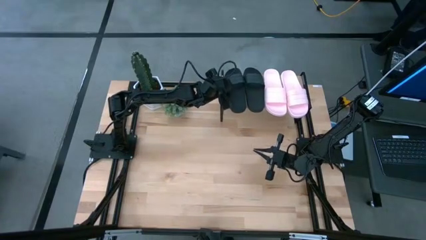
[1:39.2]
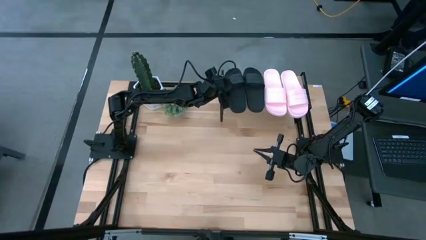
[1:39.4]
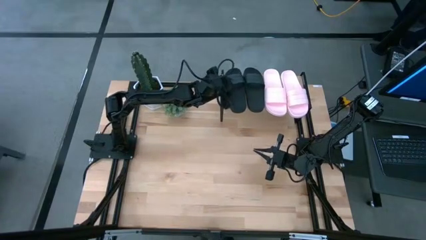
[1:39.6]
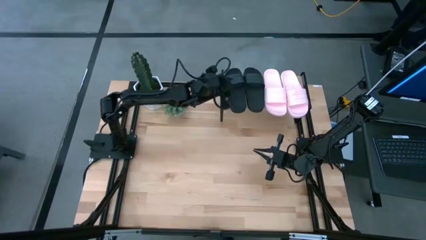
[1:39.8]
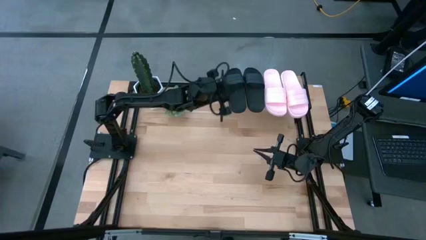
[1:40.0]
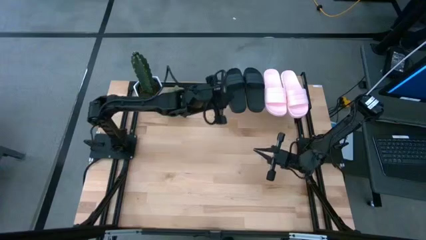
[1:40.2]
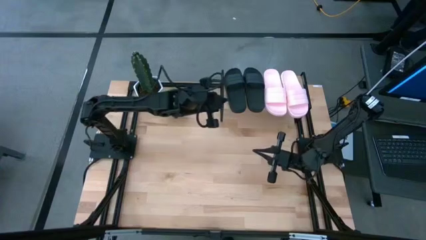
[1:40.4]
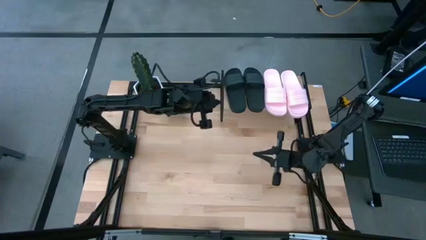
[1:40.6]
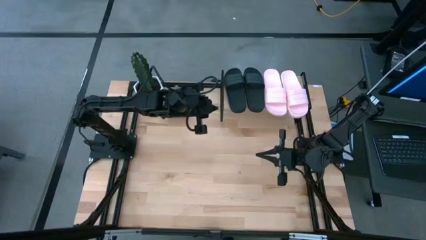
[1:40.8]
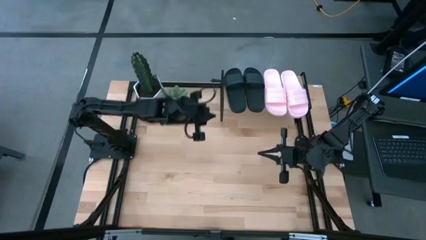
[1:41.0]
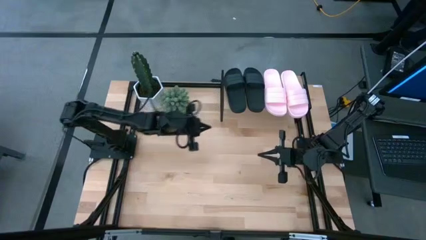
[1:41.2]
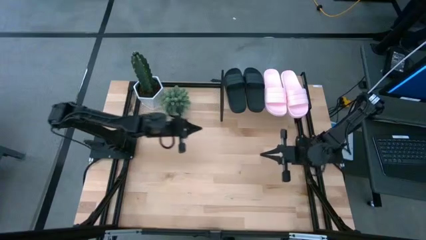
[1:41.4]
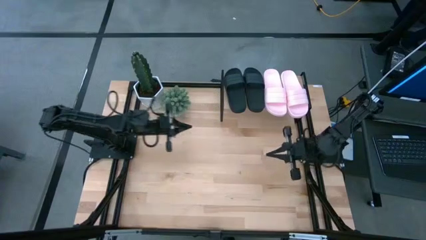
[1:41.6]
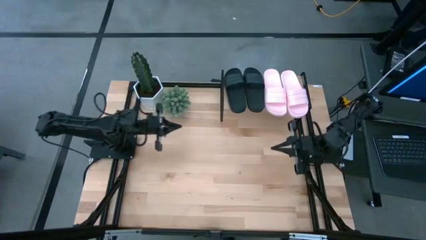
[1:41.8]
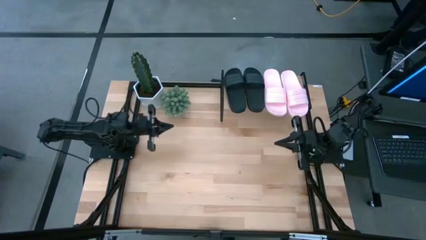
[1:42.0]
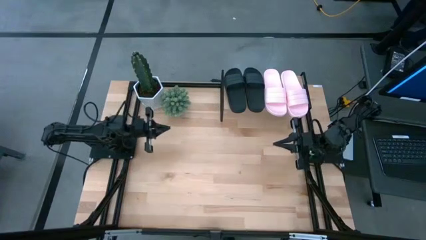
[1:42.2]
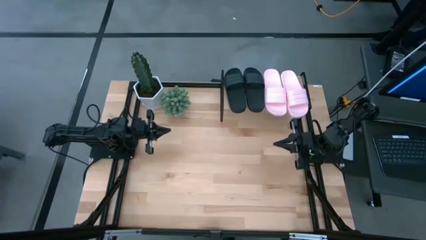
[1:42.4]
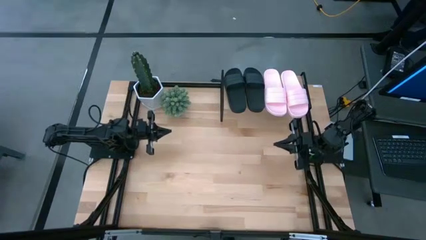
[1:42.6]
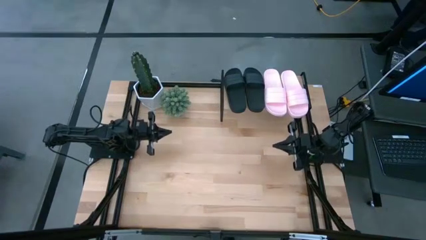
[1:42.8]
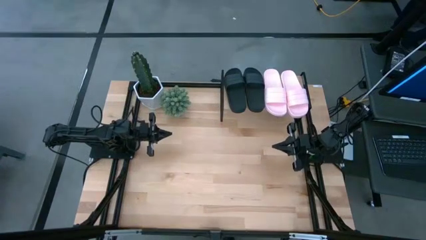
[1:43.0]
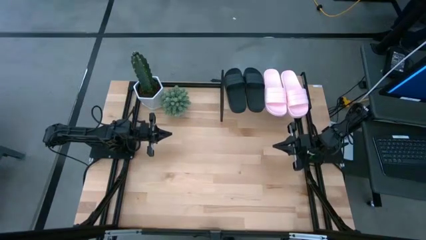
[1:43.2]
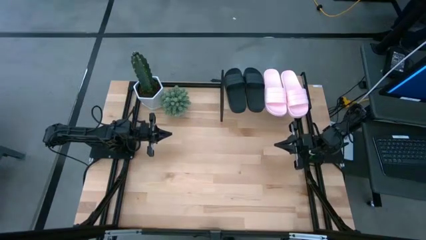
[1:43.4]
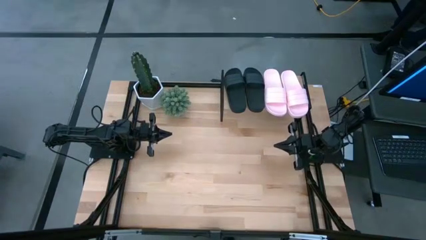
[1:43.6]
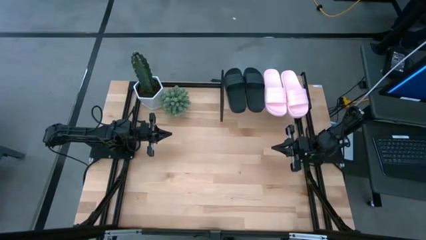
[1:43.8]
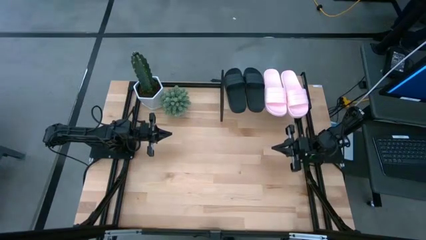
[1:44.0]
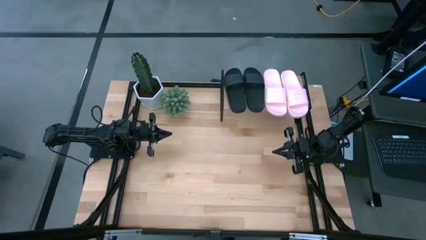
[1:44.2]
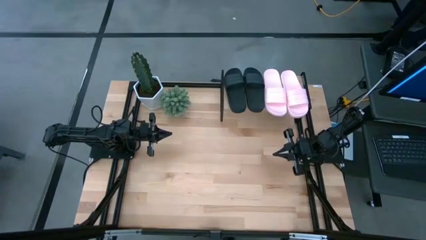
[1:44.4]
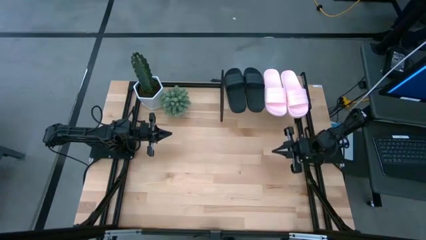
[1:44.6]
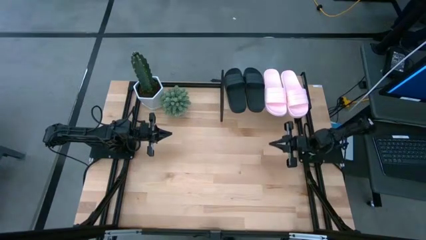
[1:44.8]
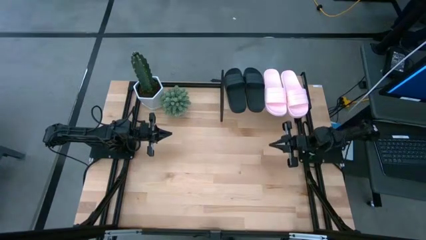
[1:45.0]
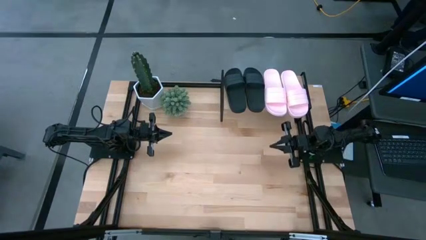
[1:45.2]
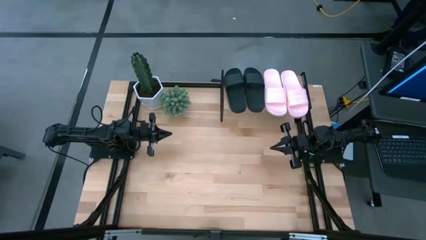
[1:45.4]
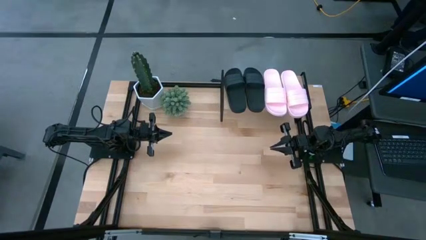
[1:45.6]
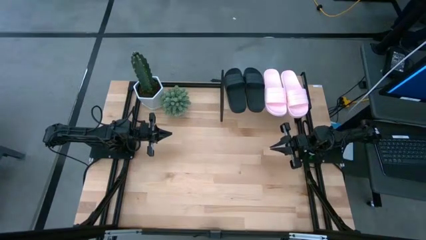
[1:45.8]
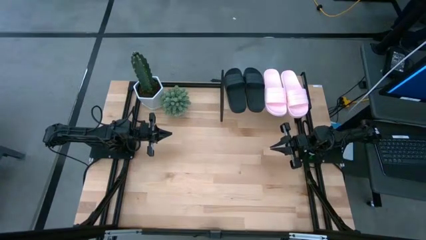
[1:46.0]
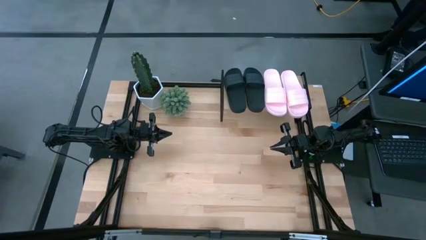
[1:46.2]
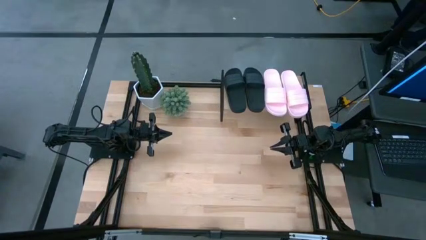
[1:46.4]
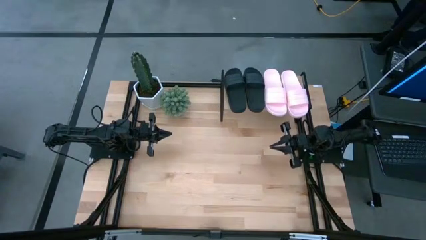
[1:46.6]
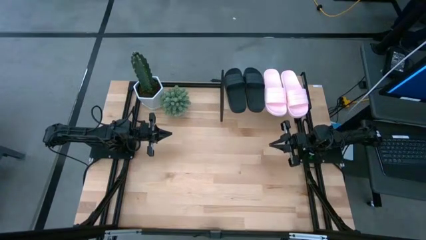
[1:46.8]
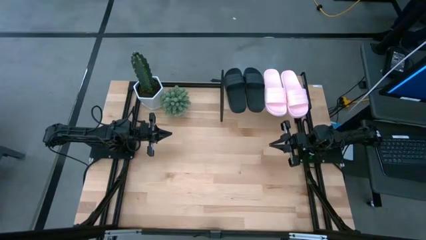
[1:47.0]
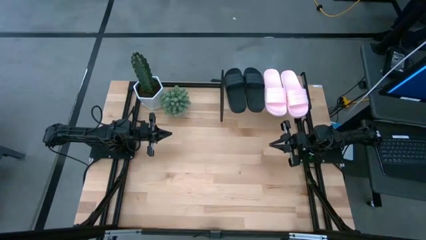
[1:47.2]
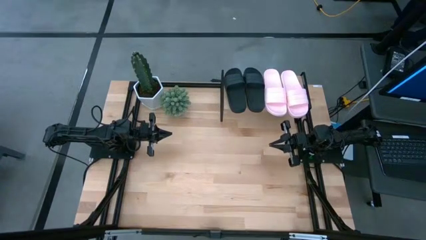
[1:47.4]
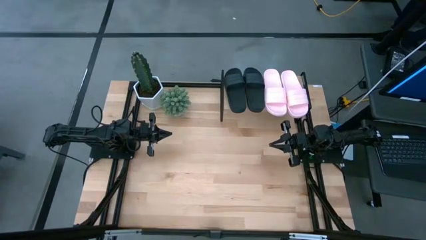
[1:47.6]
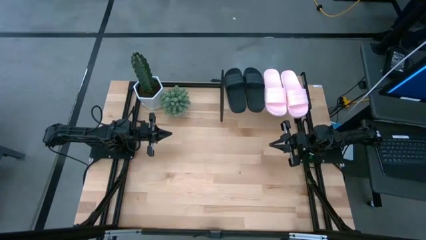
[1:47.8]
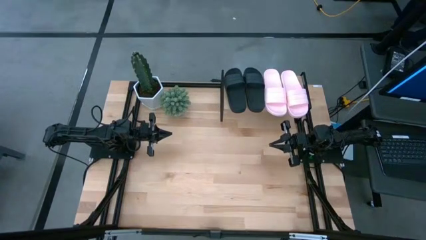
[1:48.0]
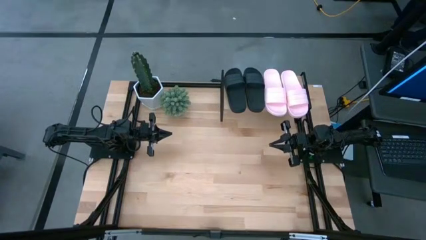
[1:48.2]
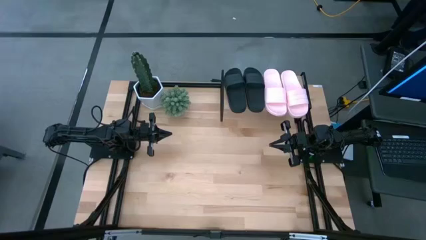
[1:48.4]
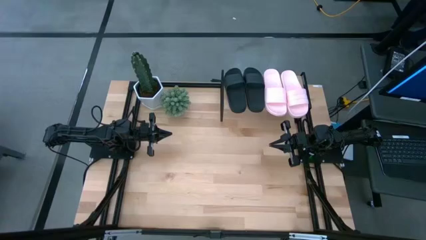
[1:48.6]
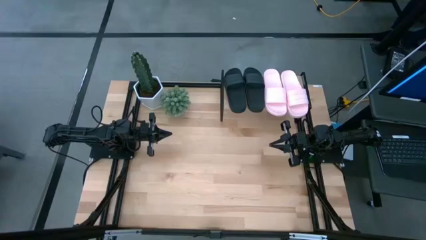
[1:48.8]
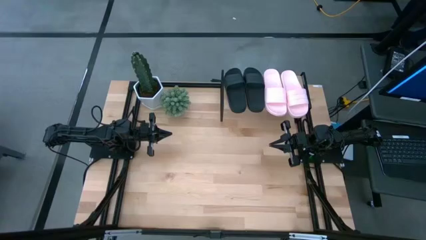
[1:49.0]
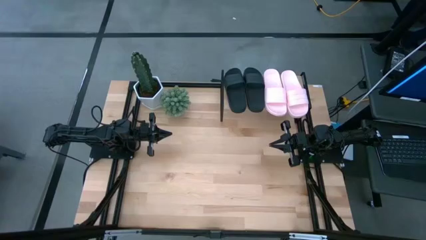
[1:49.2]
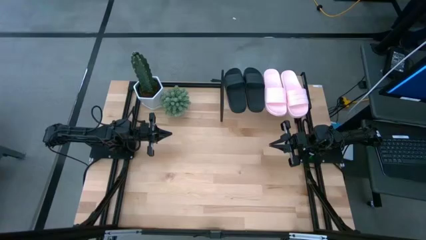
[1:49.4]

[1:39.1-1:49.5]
Task: Pick and place slides into the shelf
Return to Home Position

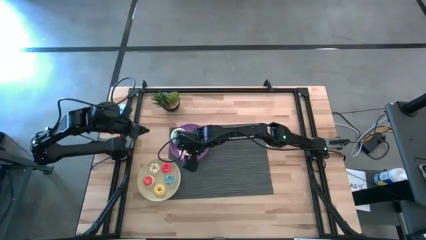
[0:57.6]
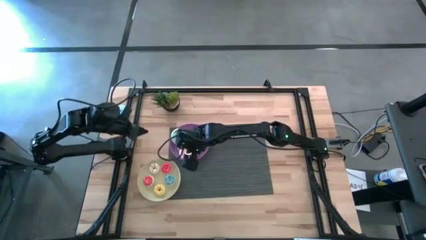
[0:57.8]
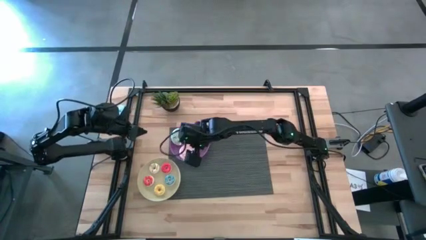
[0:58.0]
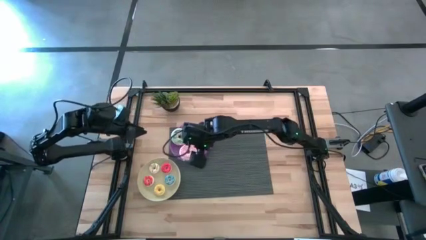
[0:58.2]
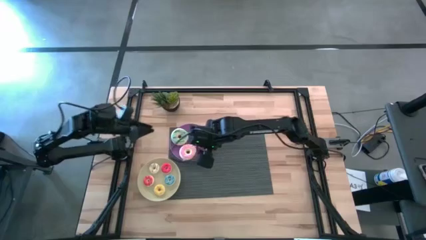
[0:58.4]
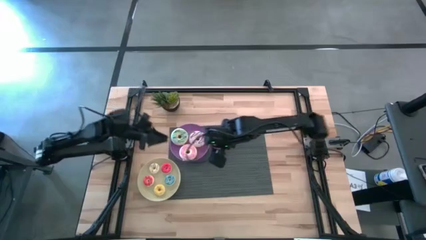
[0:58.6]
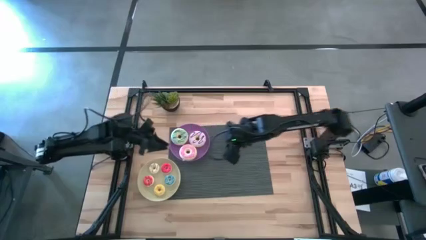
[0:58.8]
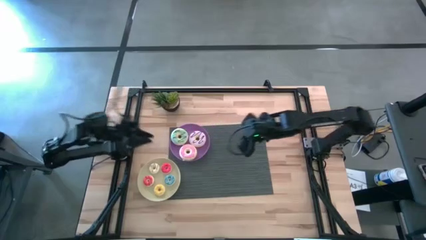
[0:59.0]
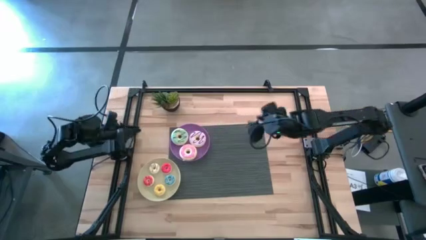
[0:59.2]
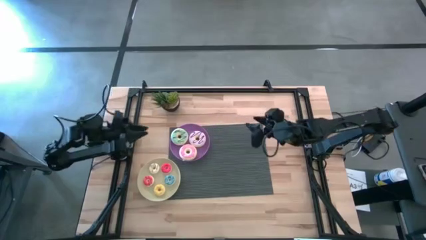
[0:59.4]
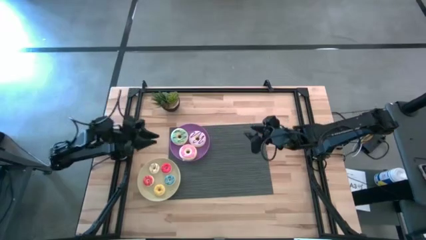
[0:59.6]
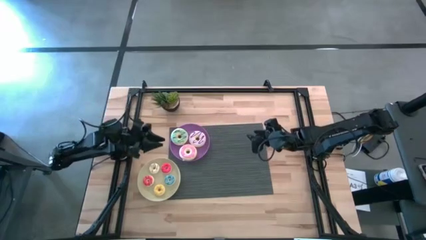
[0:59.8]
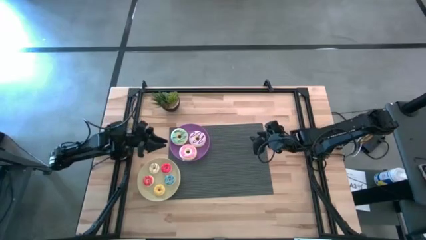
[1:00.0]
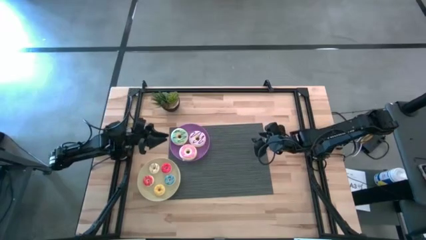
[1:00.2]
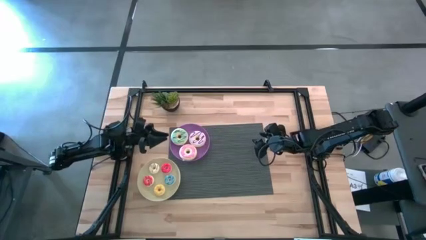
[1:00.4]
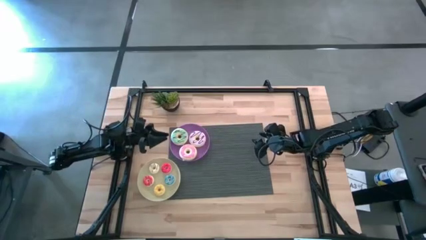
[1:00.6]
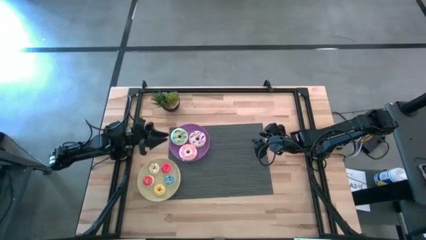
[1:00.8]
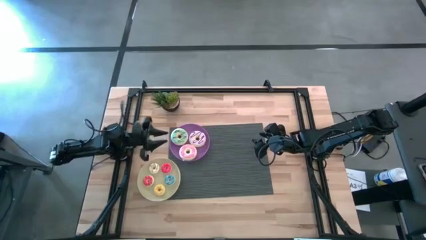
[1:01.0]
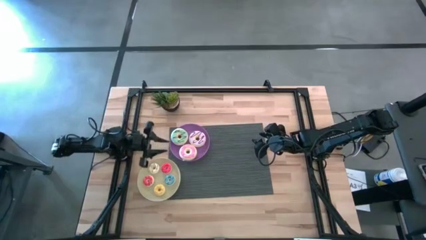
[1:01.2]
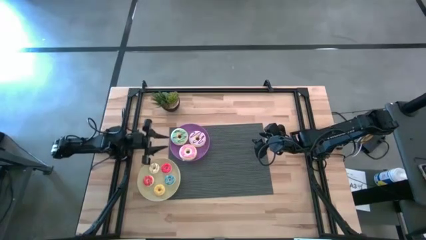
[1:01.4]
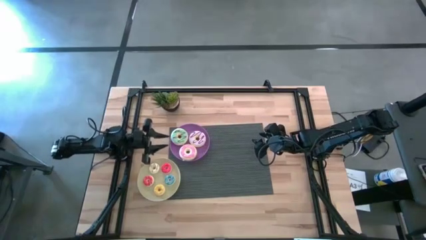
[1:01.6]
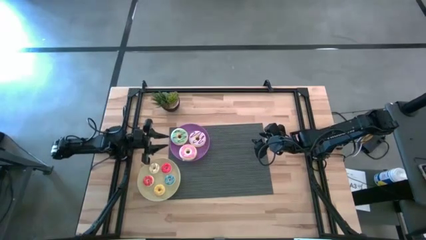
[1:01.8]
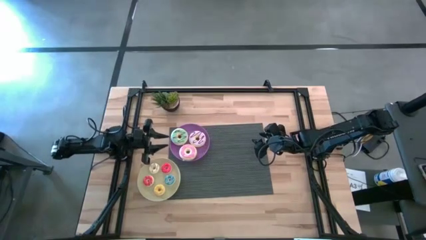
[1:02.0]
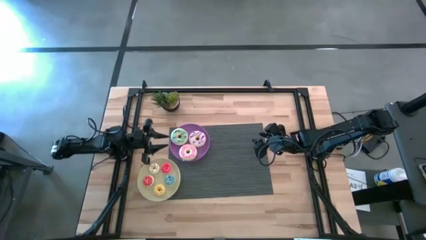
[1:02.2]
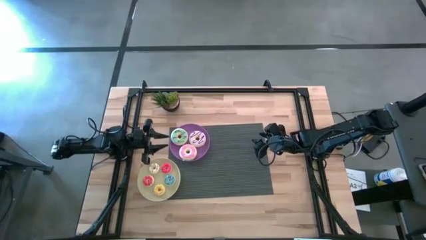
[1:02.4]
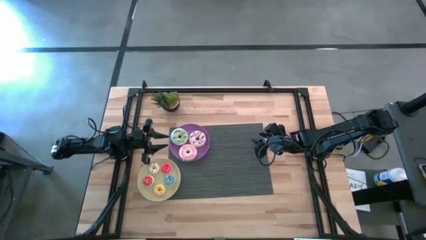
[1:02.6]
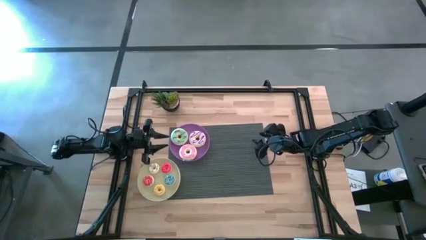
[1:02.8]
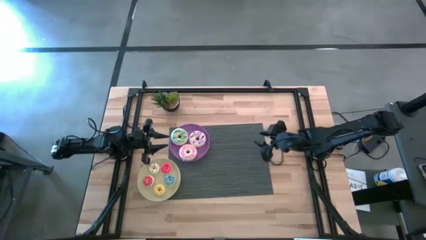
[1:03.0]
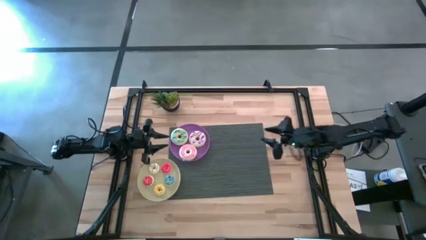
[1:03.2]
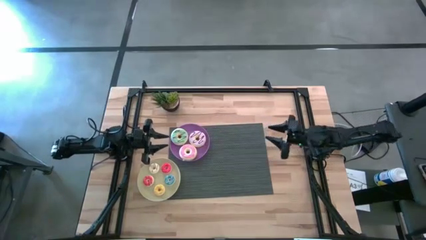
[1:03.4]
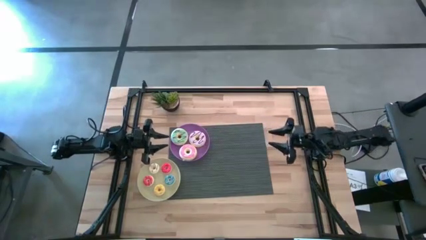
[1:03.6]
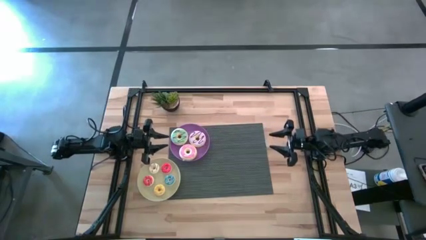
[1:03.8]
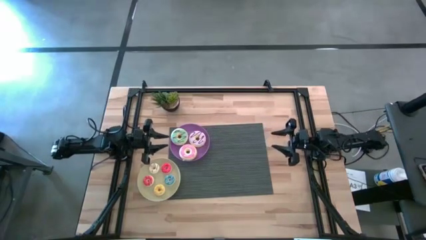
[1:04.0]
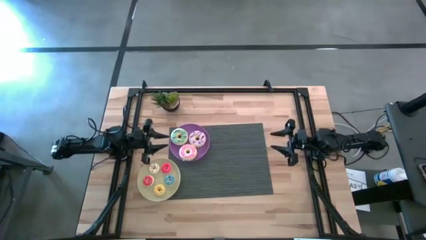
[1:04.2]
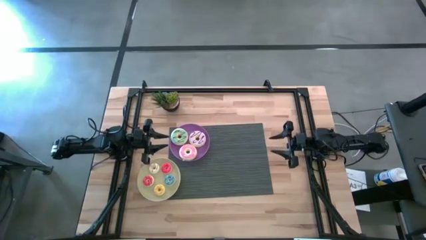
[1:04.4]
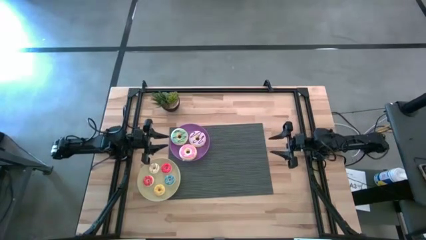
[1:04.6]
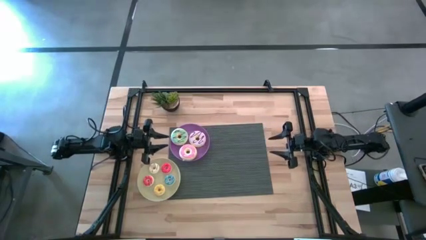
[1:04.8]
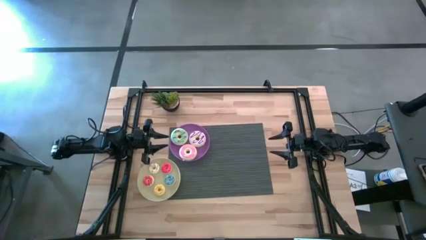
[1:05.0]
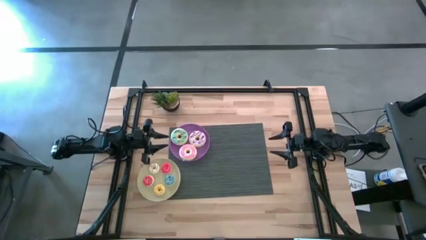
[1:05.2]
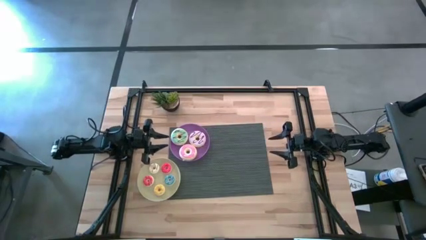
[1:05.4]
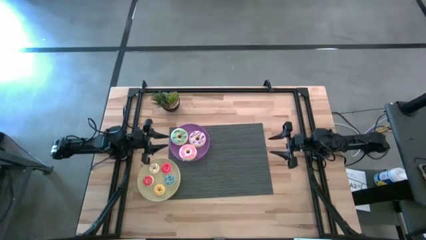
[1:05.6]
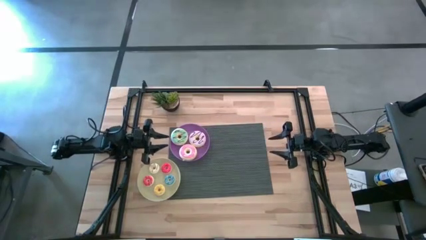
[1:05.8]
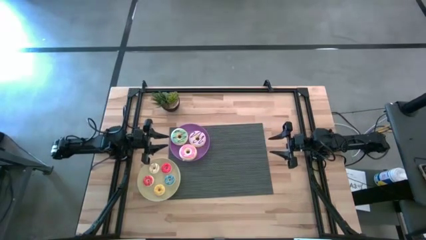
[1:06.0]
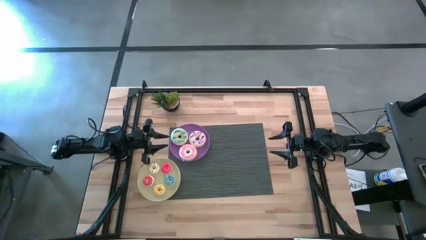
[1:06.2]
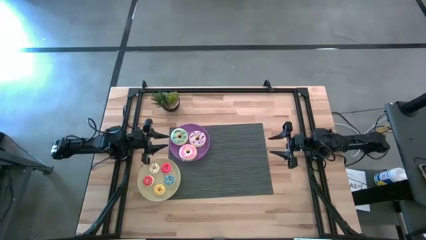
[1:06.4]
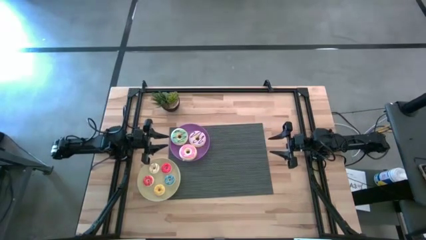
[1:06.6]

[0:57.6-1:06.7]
Task: Pick & Place donuts
Return to Home Position
